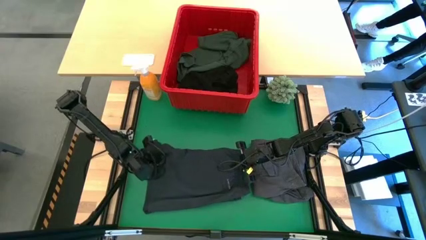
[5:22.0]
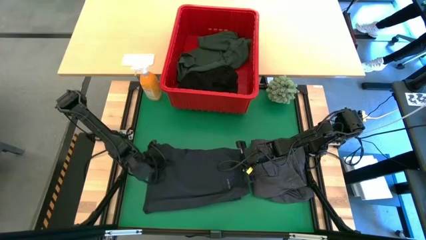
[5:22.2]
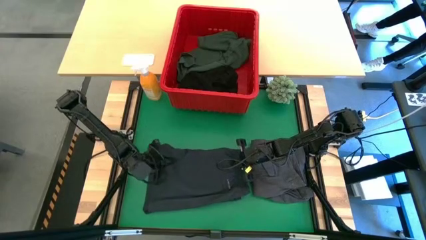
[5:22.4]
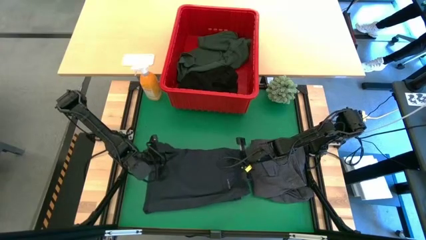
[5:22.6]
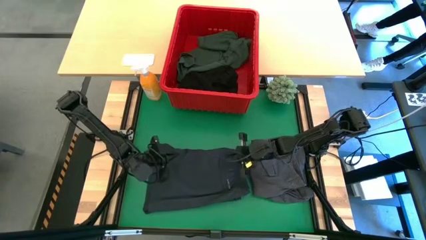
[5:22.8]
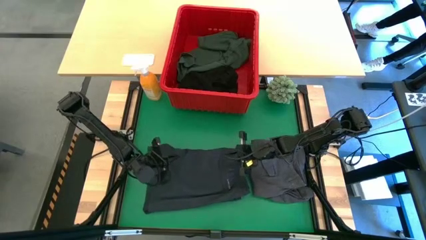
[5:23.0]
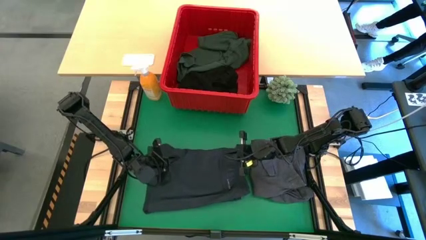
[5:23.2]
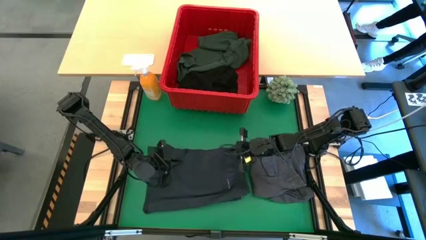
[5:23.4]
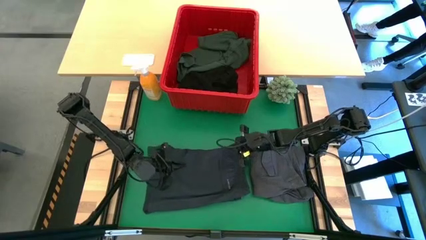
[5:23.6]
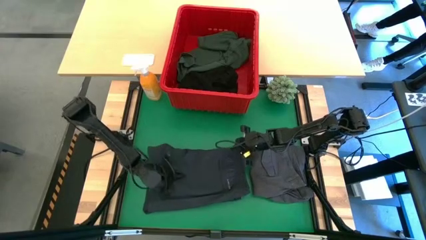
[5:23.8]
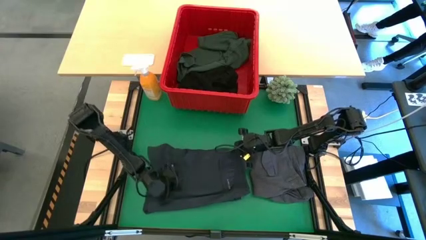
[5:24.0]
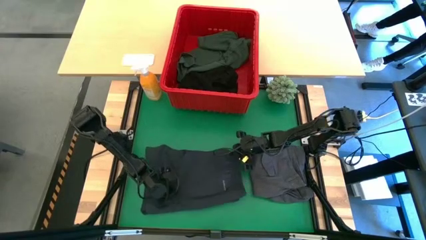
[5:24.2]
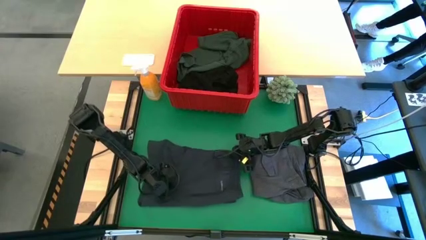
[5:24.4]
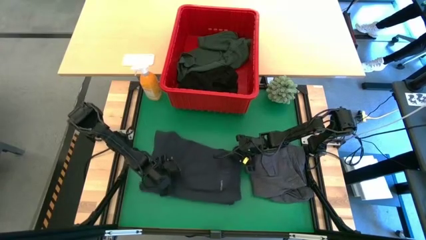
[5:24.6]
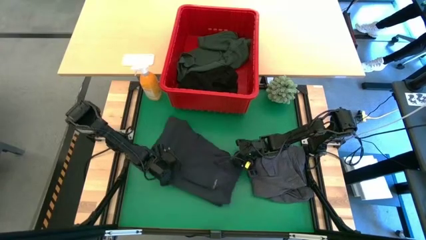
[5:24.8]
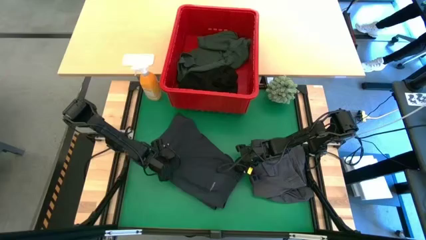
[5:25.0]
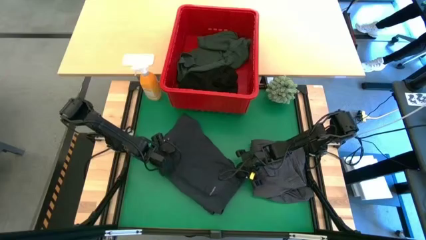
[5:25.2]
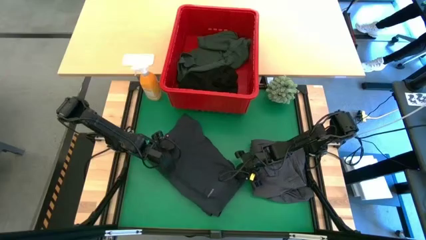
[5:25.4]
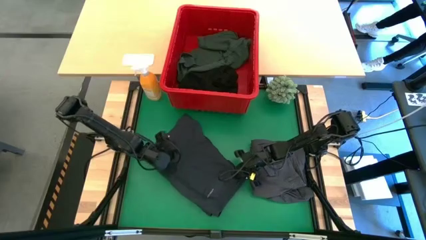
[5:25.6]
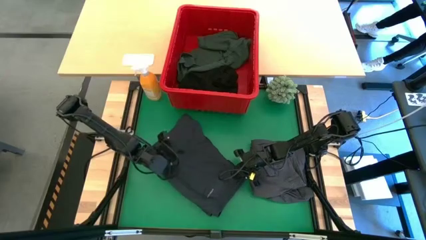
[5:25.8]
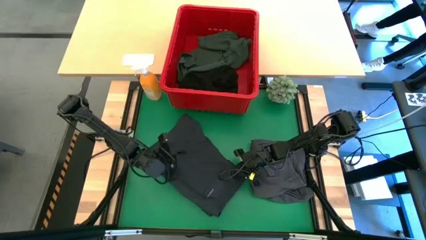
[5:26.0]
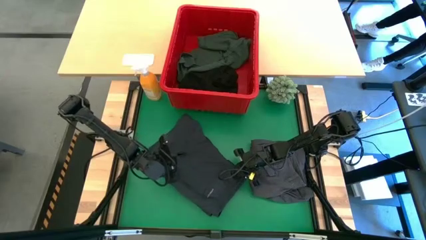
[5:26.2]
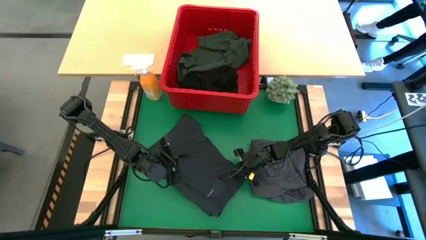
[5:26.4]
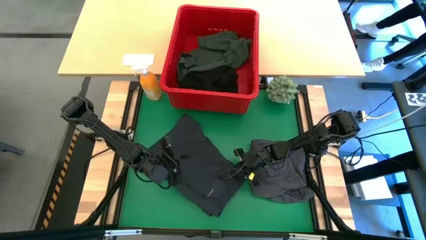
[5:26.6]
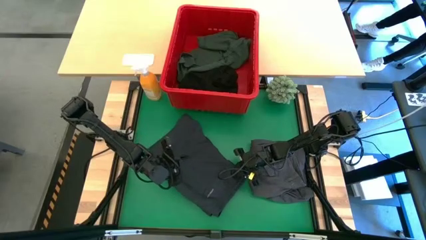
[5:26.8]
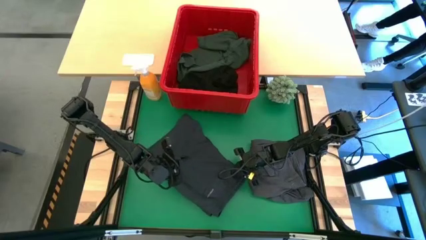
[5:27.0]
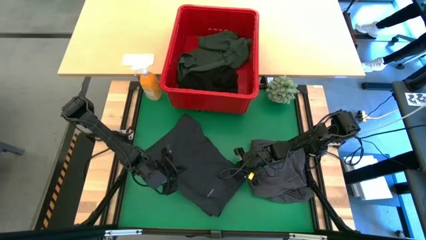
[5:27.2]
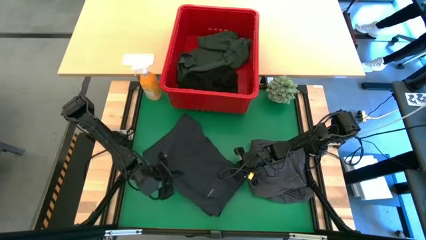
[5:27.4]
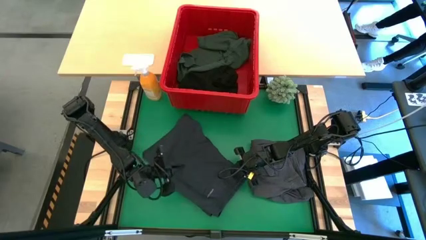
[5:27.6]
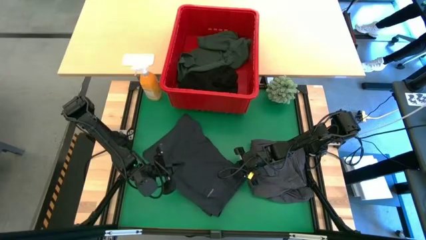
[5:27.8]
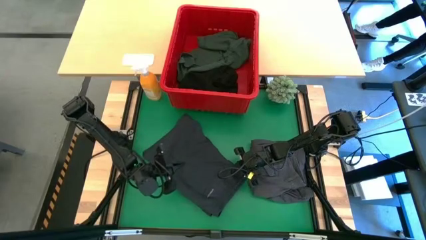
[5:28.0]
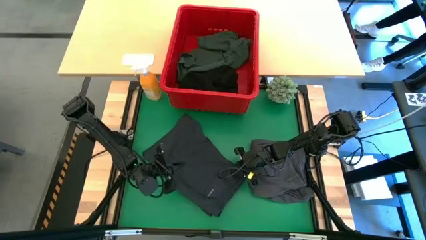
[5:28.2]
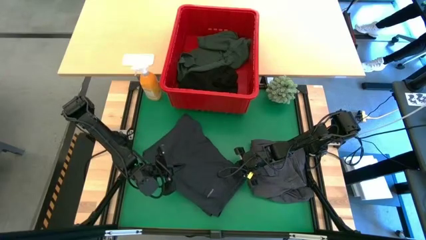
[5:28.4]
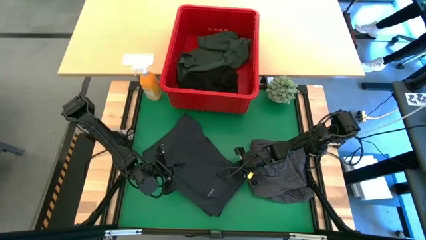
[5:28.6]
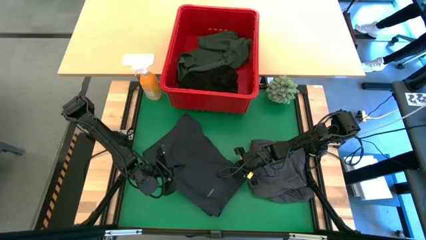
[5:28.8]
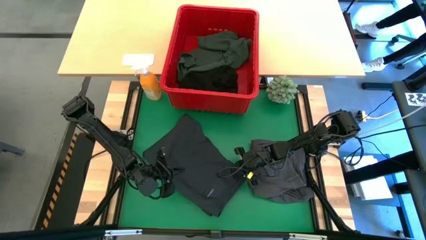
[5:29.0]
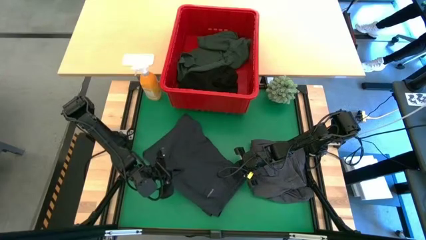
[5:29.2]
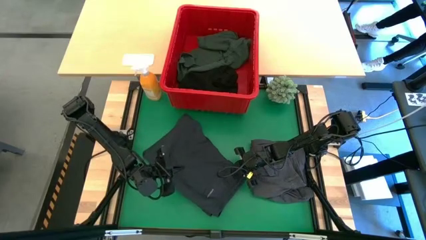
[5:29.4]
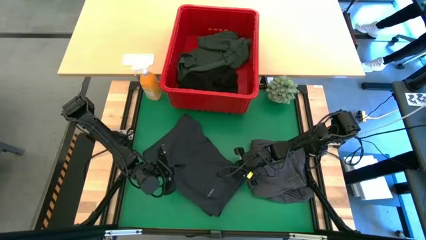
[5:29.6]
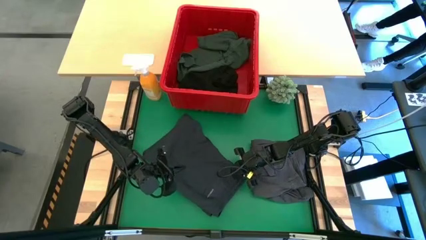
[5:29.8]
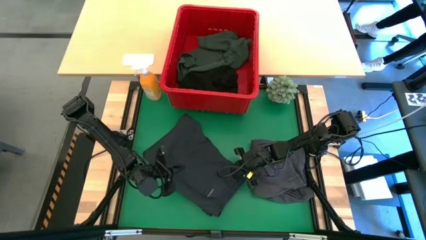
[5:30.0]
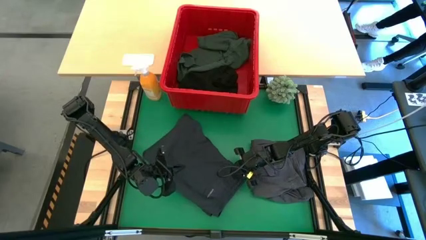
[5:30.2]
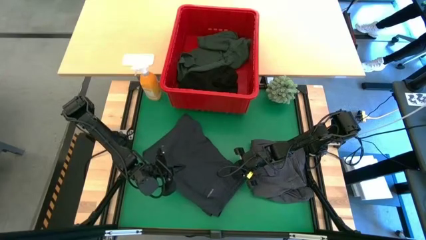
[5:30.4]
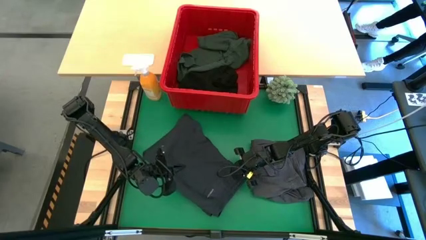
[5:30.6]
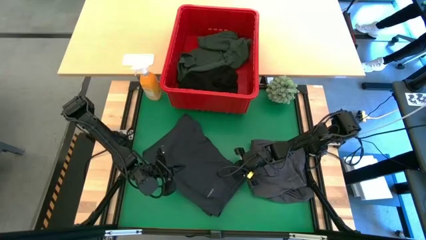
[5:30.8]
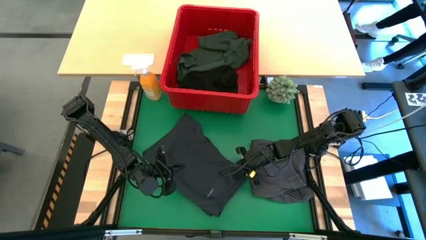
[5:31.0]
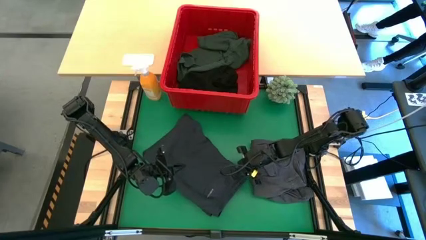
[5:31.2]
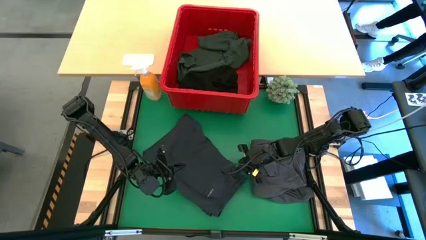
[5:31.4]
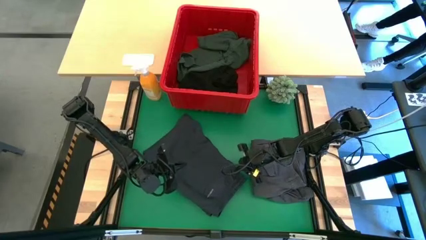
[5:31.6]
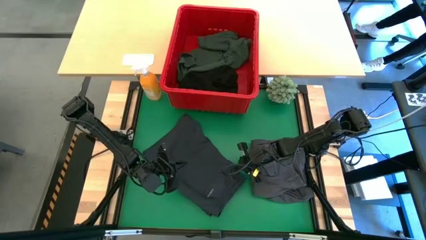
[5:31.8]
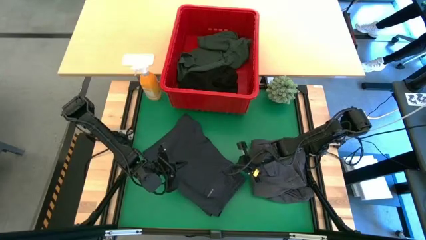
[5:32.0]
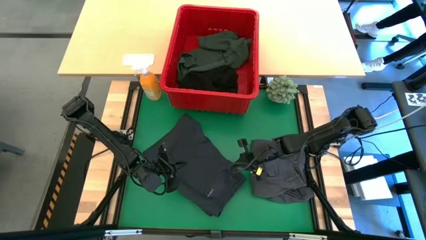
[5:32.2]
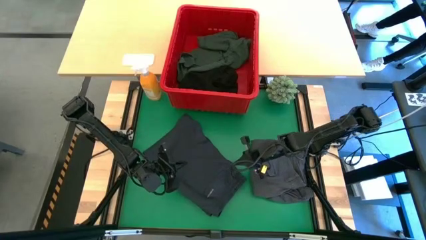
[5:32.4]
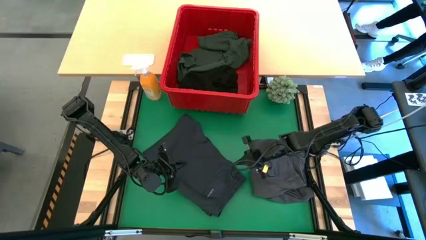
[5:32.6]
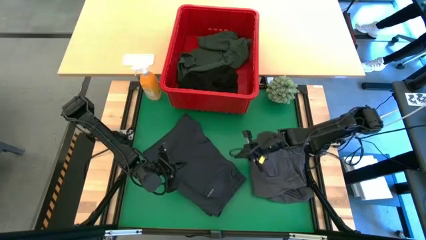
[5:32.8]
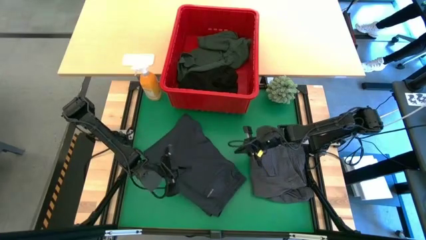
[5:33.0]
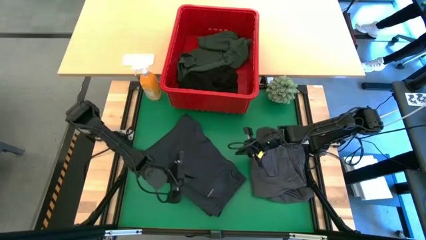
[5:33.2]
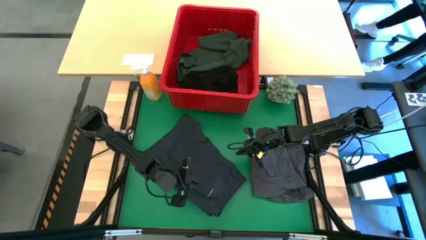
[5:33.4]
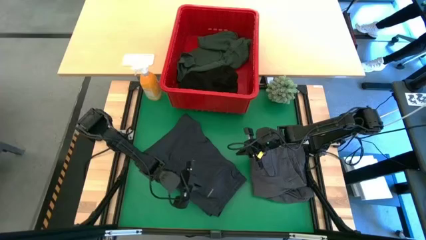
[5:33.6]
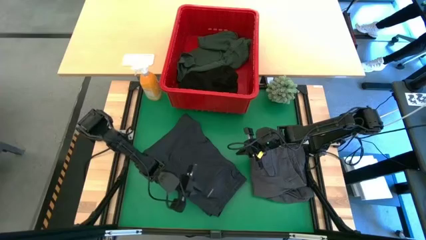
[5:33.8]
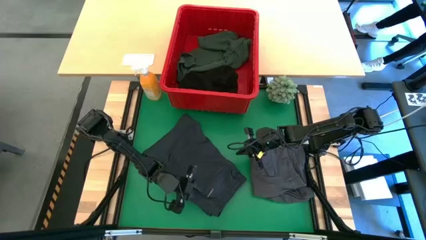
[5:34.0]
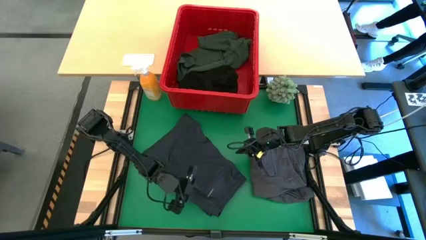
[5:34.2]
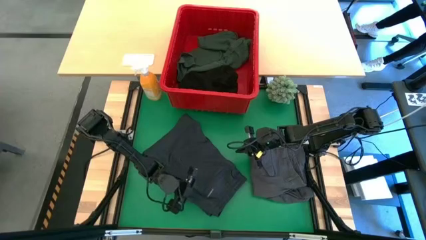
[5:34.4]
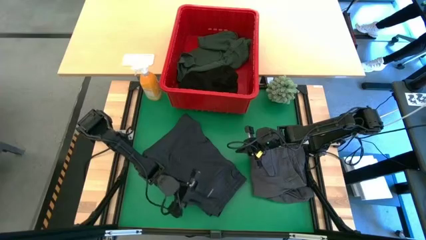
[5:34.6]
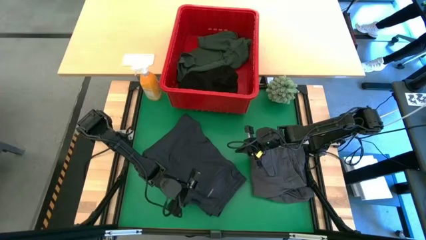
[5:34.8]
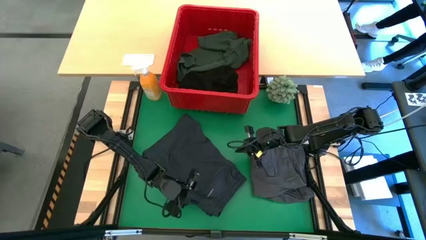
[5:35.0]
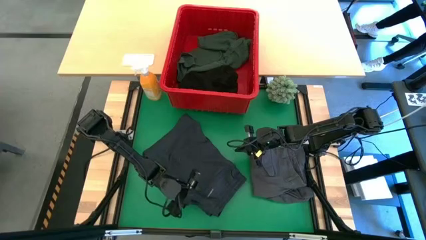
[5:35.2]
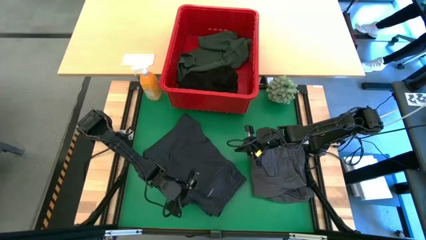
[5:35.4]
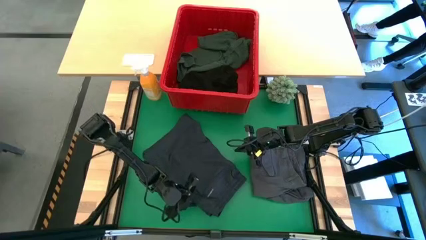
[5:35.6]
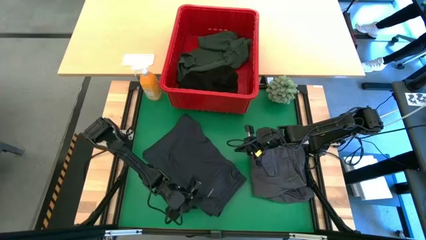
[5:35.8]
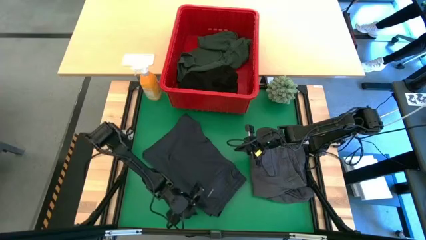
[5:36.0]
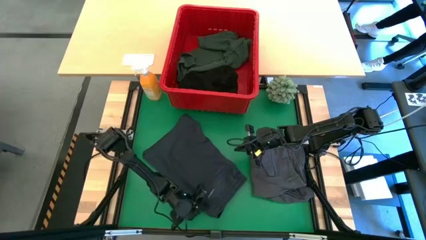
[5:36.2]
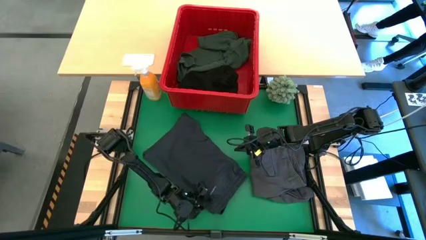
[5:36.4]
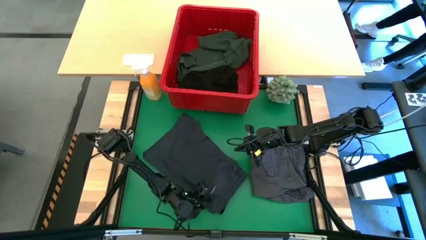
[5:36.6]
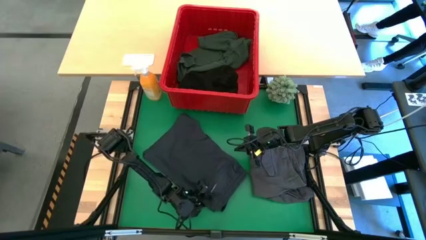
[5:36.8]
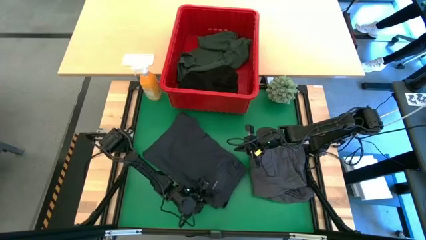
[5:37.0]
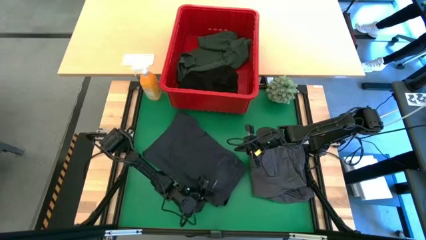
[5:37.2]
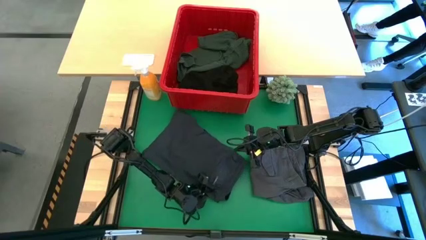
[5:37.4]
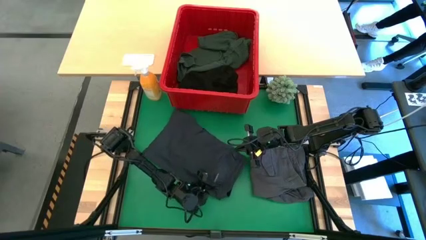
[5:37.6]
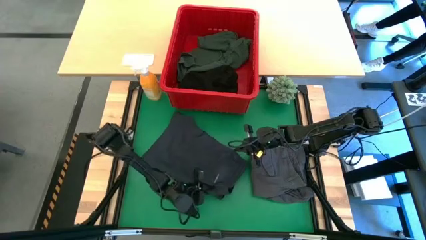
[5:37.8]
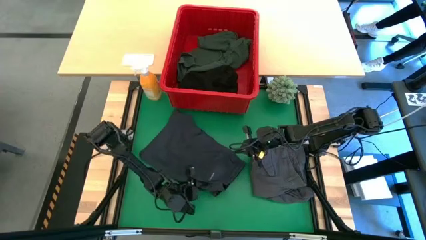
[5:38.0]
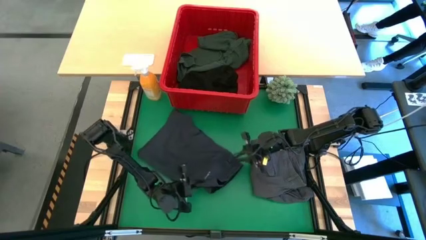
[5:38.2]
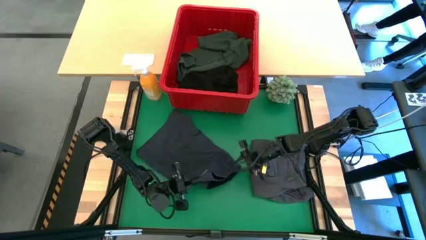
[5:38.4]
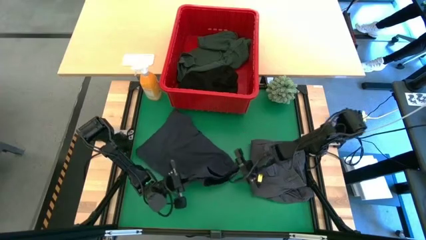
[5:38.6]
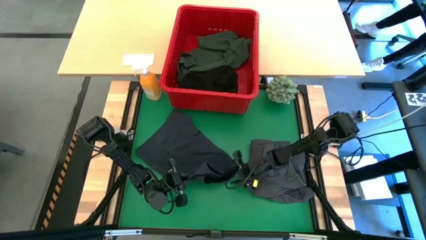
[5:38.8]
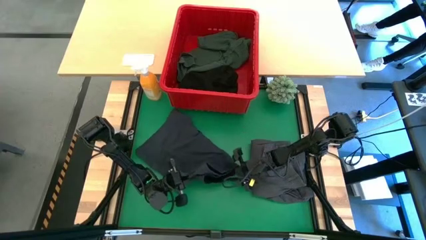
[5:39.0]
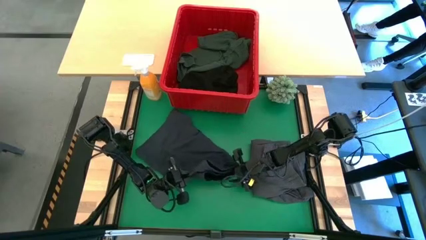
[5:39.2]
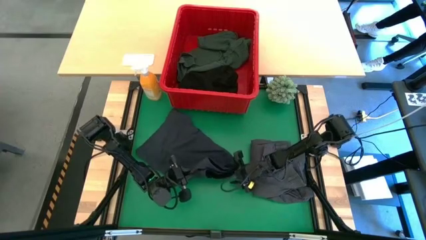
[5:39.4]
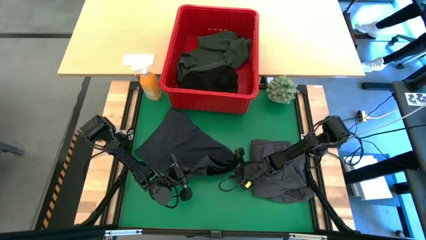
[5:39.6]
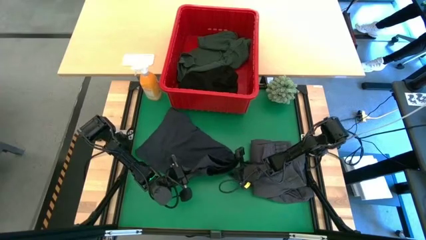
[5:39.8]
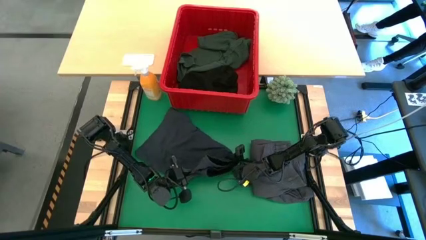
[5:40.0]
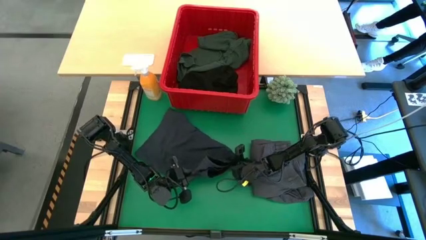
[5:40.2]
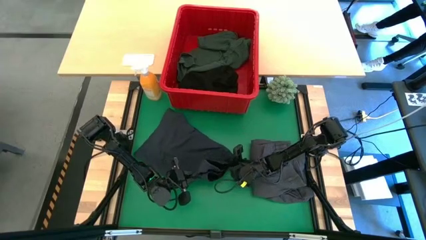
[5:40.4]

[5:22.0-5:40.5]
Task: Fold Laundry from Bin
Fold the dark gray short
